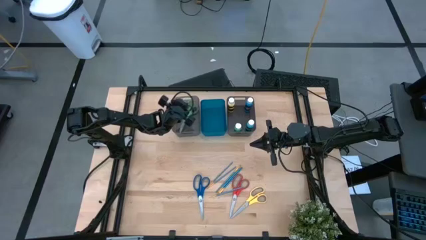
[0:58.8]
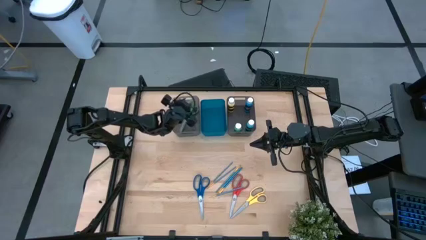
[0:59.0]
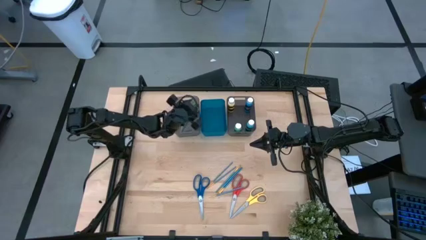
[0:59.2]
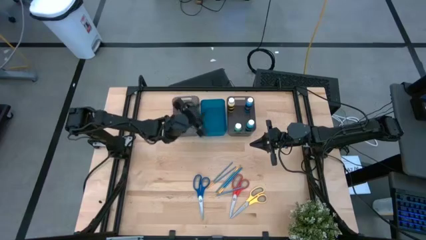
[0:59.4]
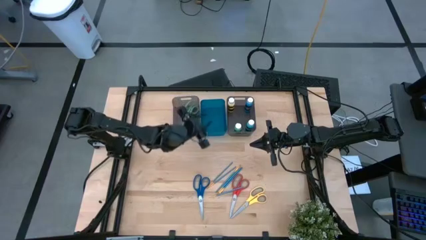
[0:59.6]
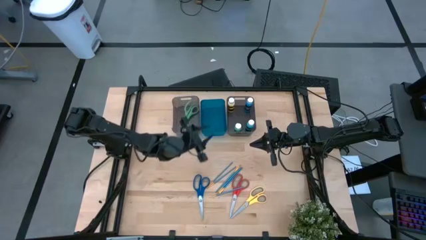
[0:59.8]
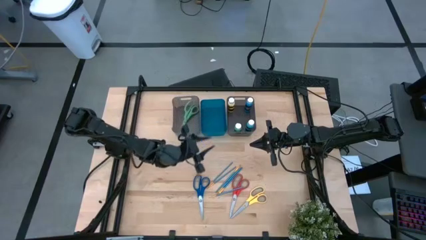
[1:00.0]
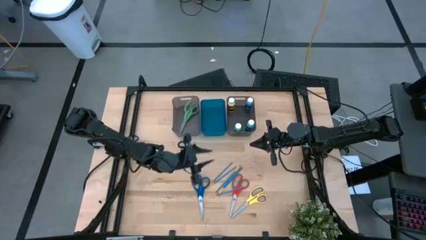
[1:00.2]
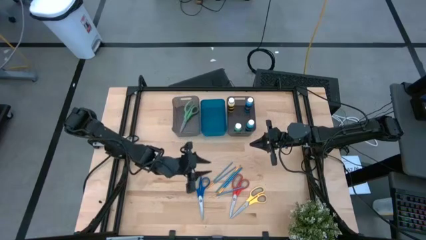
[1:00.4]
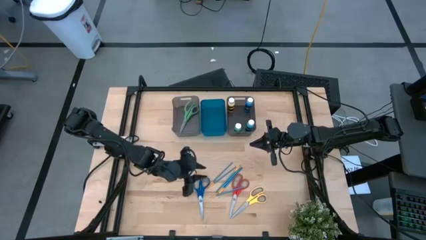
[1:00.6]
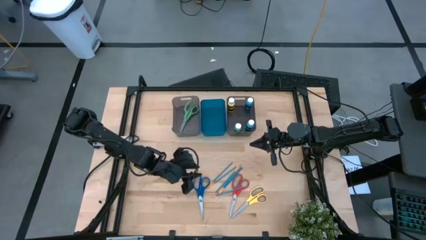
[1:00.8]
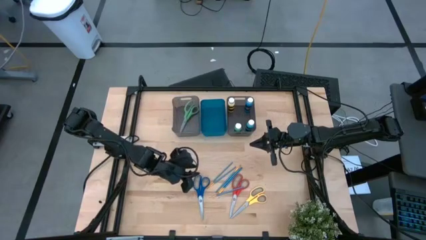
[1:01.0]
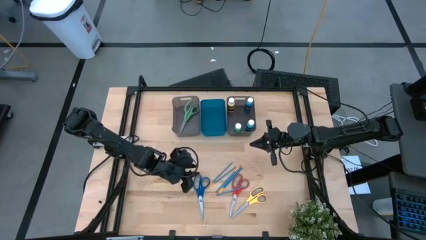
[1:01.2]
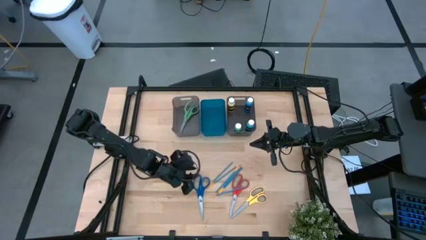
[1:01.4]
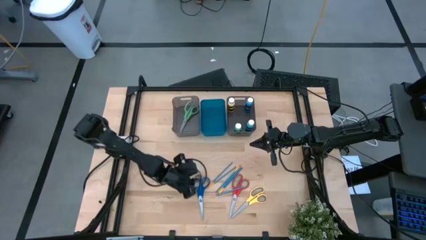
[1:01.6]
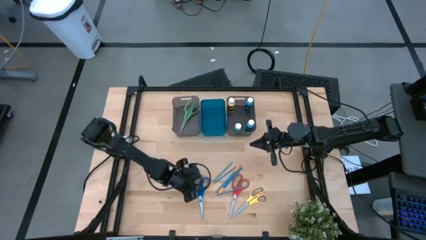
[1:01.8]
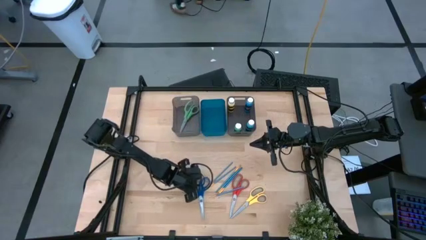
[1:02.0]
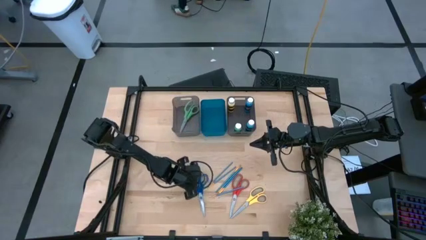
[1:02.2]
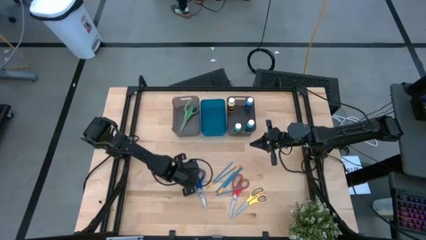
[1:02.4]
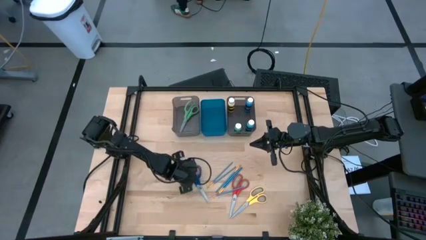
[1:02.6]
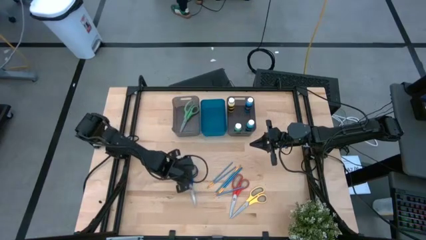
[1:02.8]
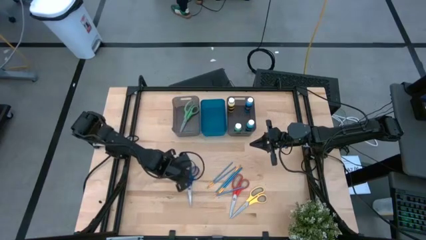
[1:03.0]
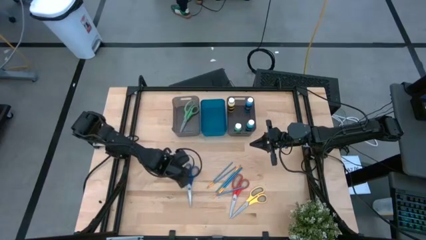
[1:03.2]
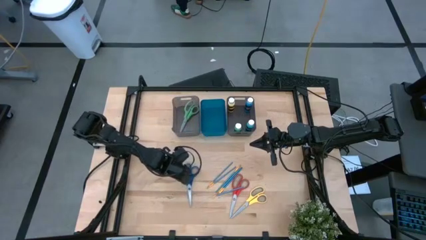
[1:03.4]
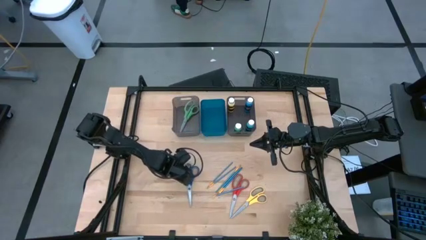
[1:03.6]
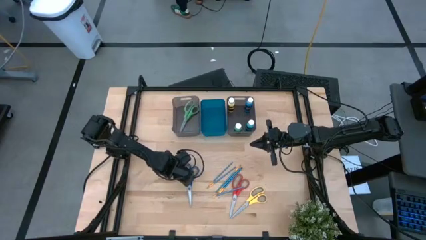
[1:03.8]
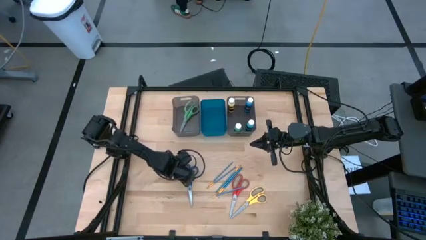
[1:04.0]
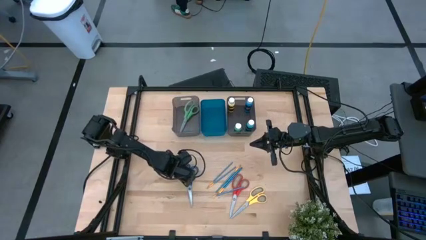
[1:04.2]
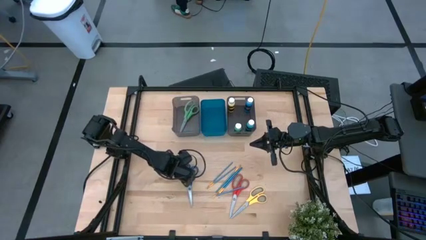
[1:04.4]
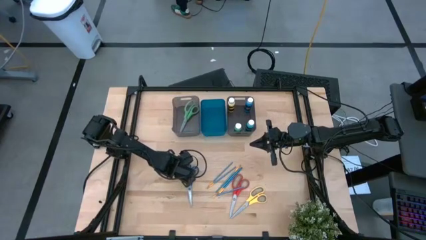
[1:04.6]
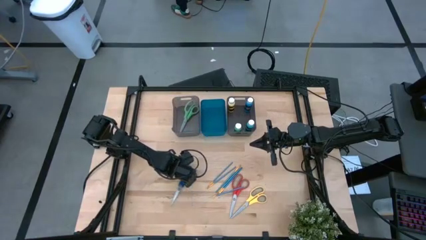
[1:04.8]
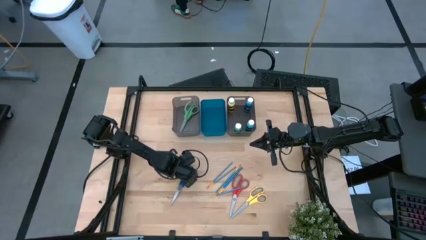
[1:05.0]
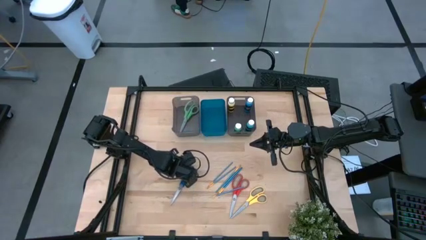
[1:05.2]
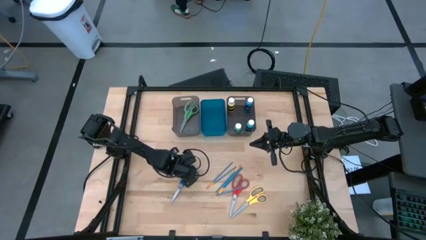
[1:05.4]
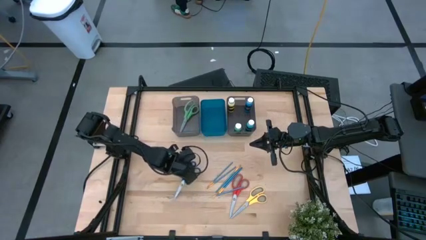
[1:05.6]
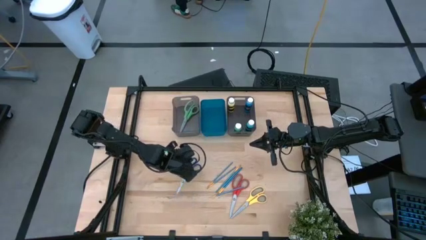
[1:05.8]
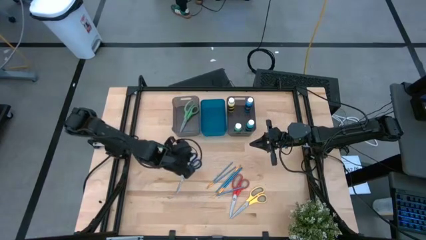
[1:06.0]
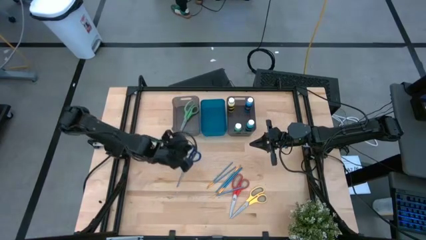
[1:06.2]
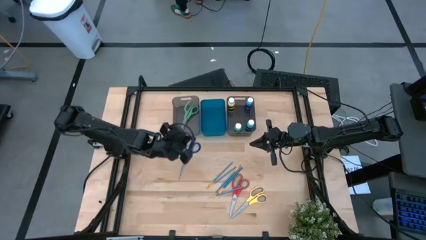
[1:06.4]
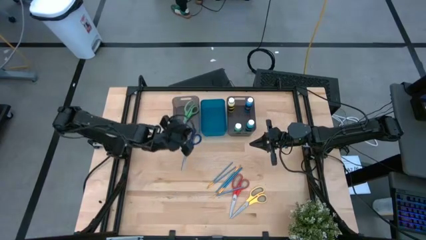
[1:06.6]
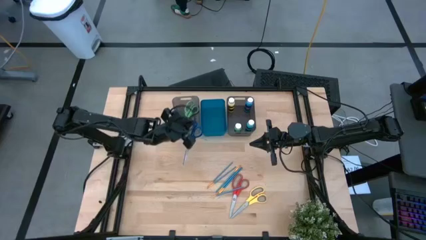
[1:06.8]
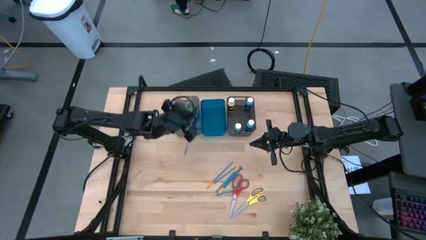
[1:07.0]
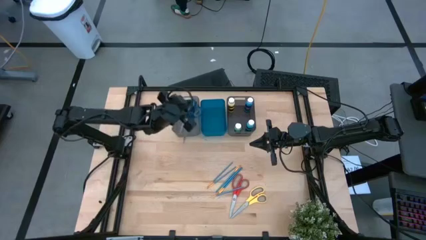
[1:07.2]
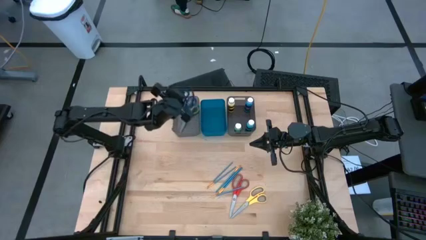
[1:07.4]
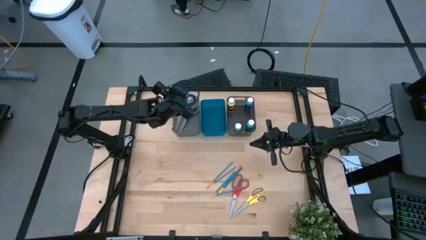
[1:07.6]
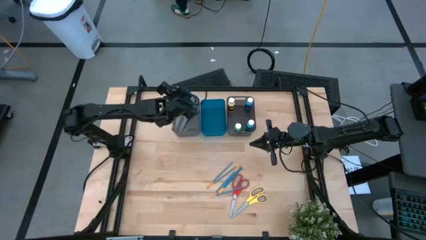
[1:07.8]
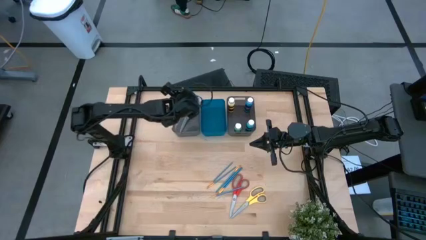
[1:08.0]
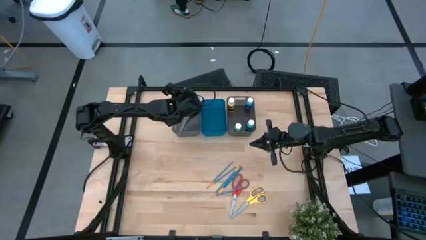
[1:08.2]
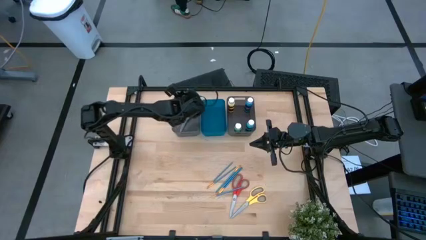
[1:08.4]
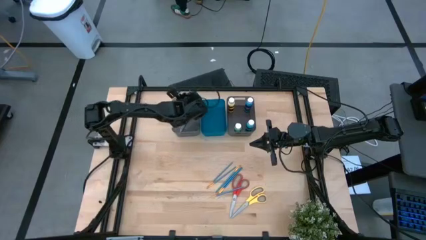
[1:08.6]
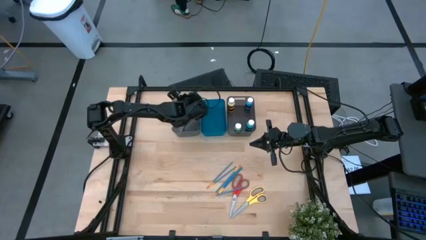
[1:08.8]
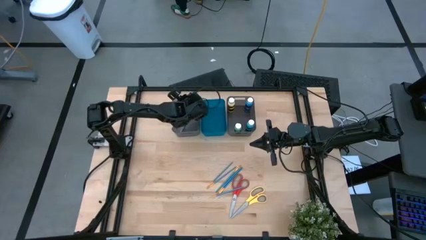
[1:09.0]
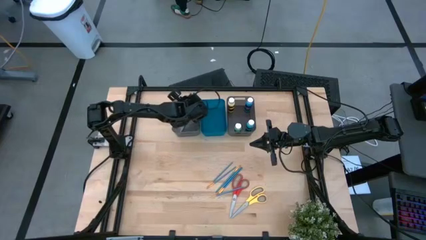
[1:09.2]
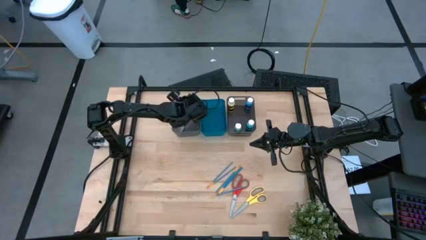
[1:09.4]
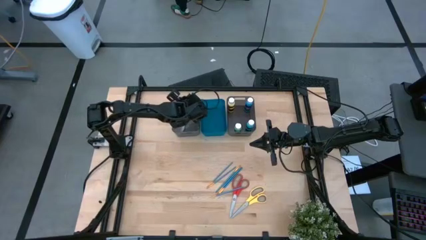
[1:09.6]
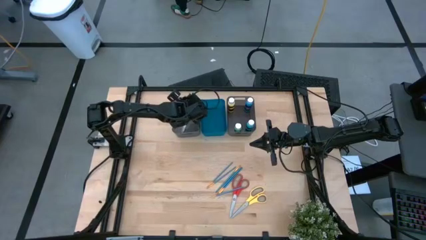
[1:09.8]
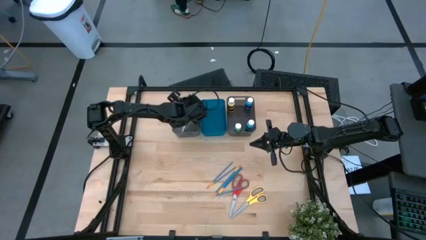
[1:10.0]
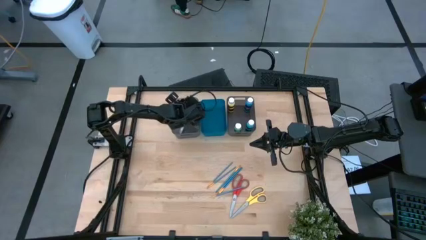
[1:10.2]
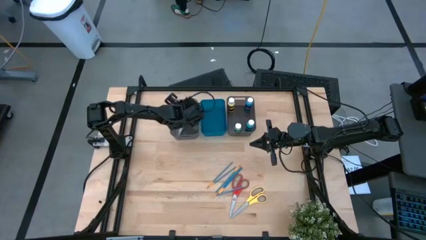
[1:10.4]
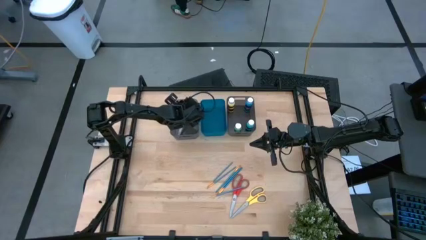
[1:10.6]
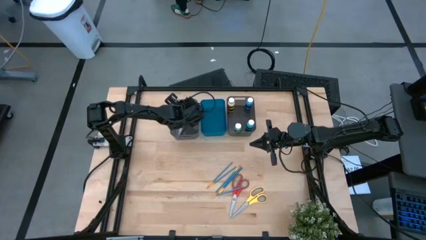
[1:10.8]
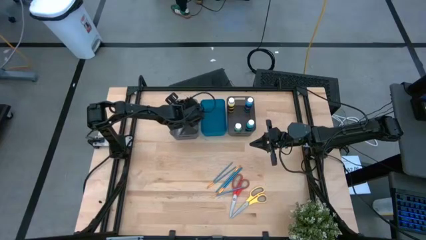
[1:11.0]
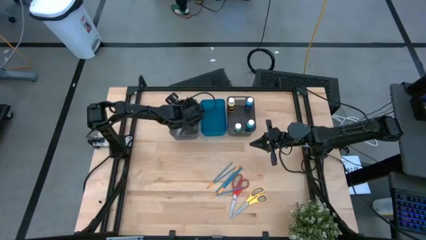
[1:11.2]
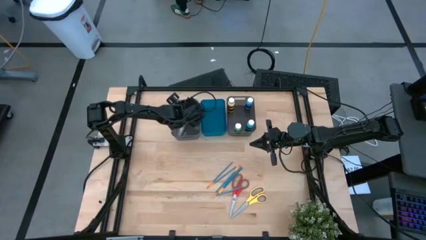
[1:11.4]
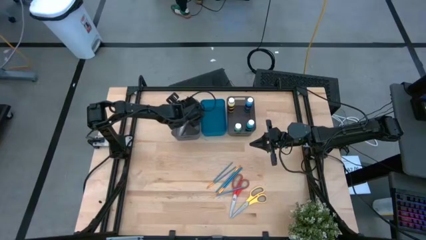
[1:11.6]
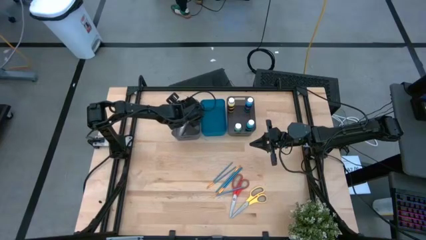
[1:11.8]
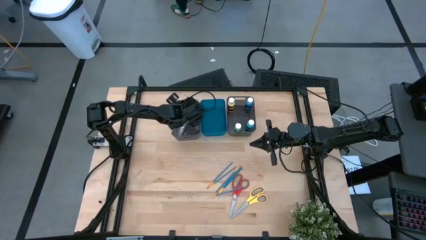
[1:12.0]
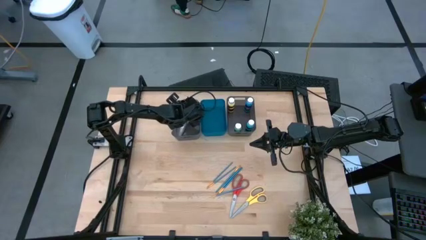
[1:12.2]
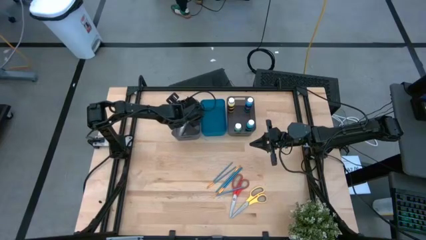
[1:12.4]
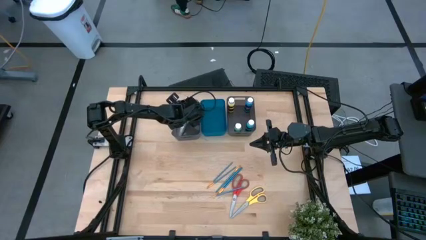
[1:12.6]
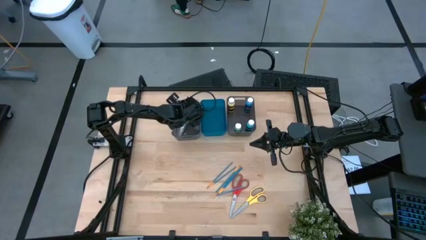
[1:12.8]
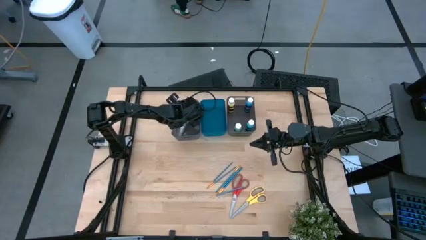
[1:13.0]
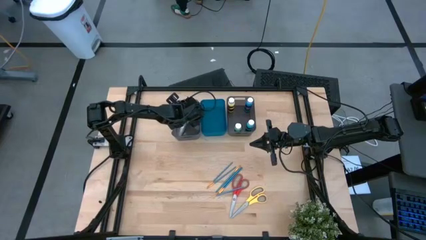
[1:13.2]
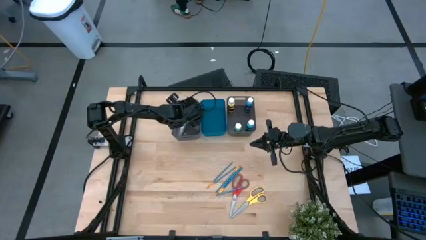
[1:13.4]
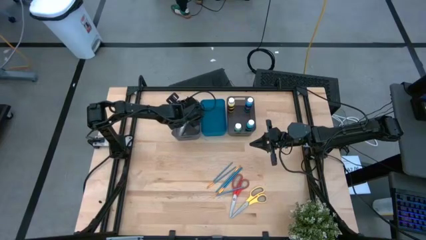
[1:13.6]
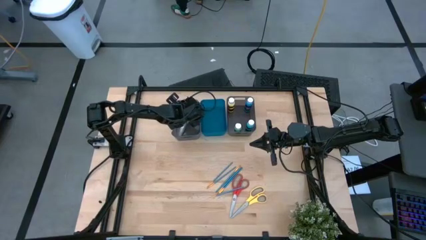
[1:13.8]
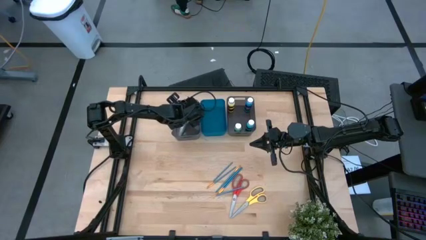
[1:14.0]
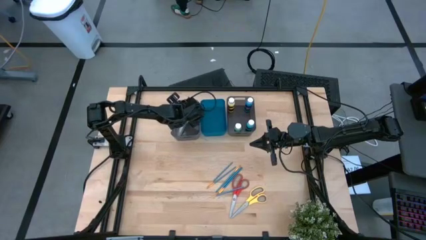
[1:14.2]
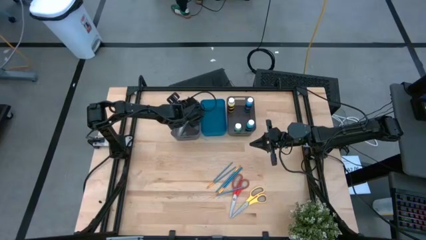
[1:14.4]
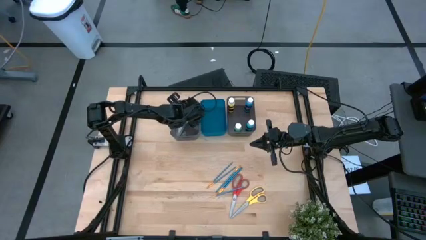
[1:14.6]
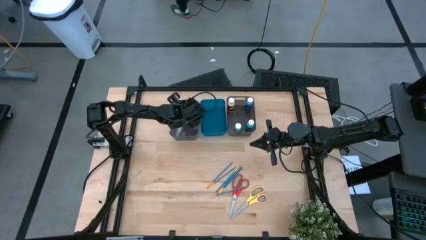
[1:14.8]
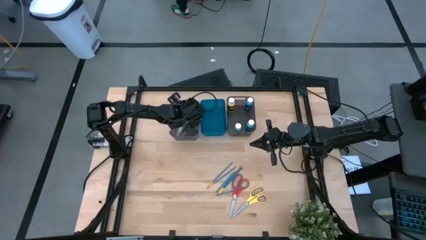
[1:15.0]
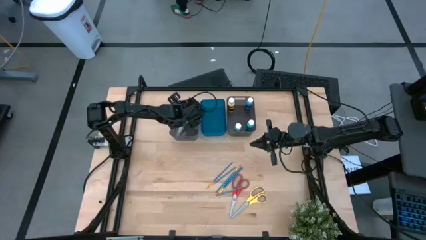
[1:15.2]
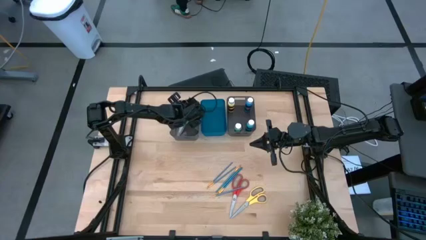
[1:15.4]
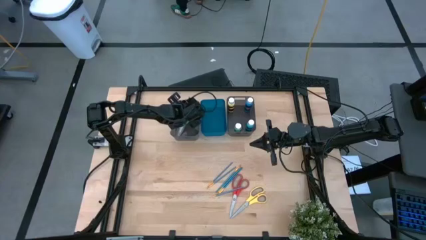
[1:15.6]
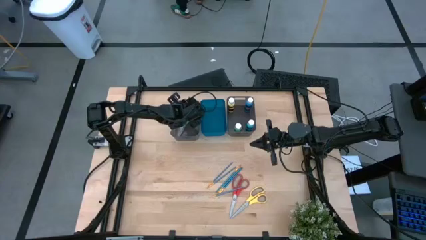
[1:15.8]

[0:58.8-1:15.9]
Task: Pick & Place Paint Supplies
Put the blue scissors into the left gray bin

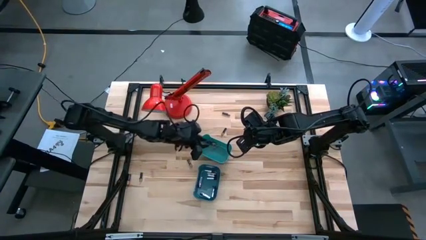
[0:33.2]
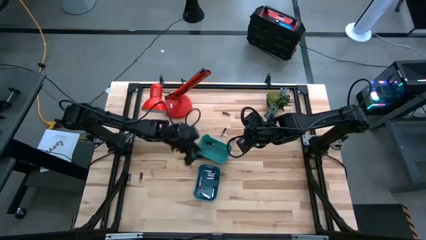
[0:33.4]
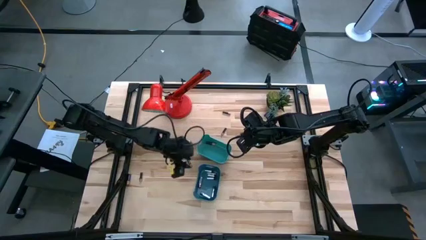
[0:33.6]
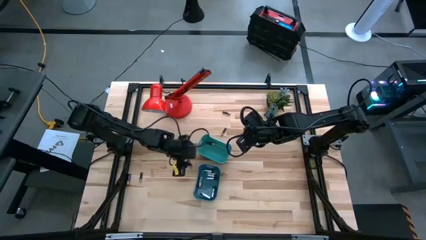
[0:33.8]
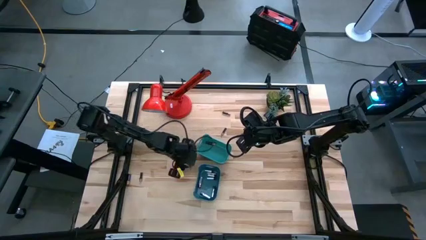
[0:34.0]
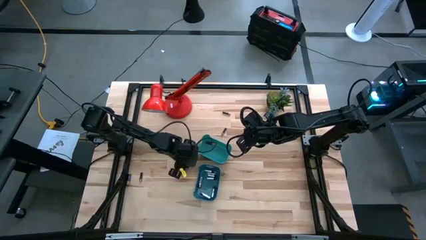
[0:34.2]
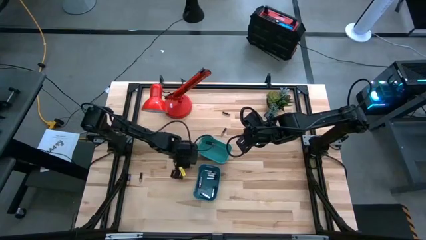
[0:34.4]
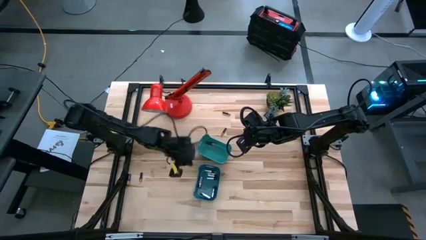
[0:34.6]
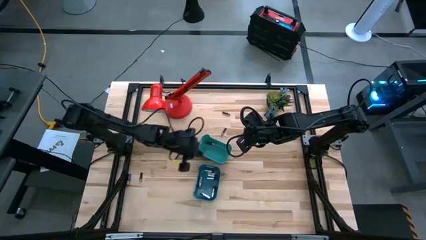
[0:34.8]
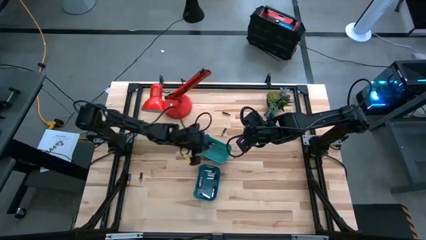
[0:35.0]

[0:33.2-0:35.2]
Task: Sort batteries
Put the black battery into the light blue bin
